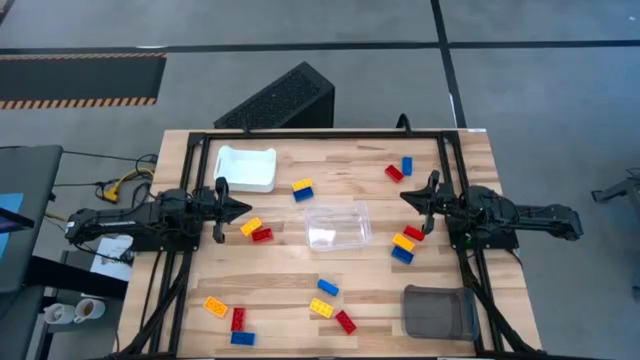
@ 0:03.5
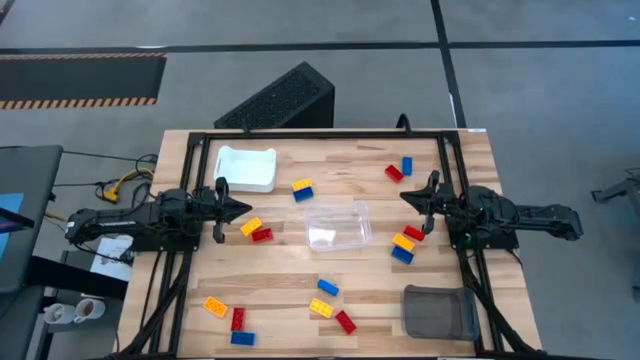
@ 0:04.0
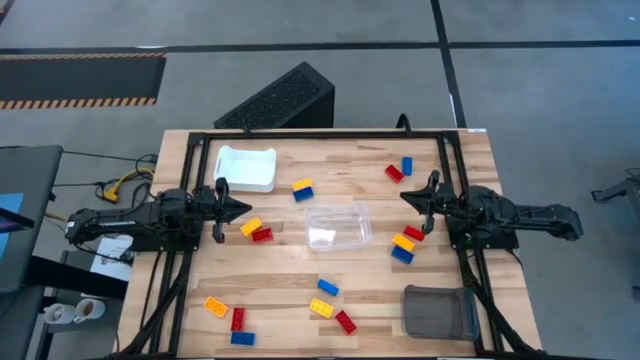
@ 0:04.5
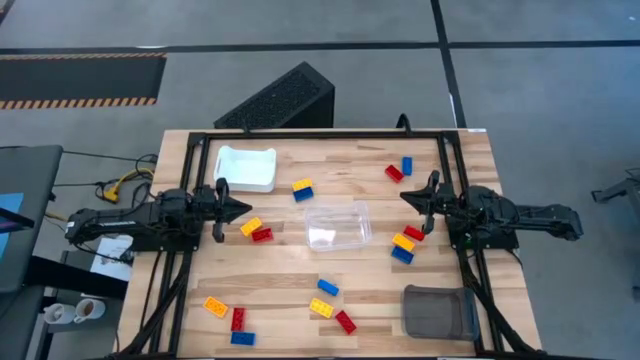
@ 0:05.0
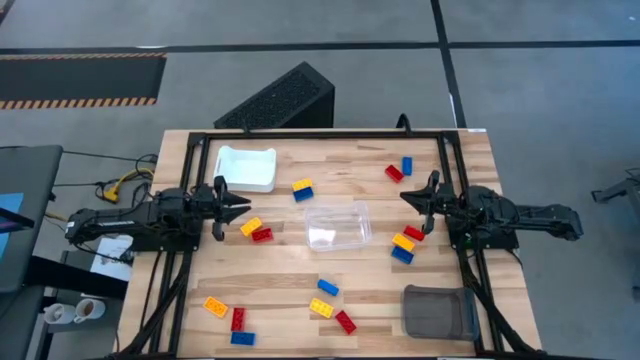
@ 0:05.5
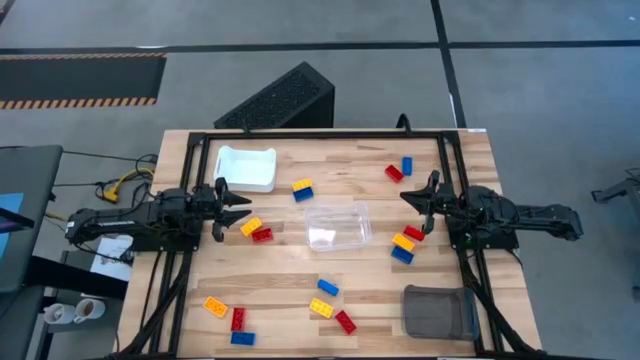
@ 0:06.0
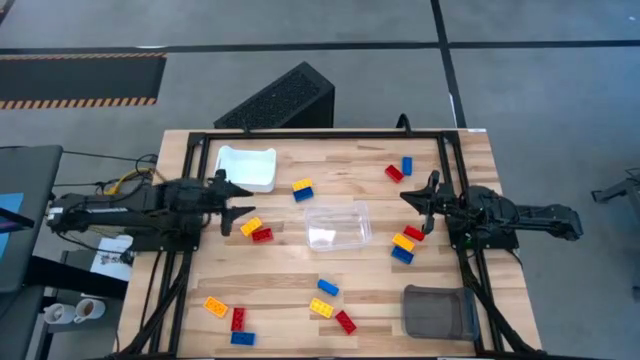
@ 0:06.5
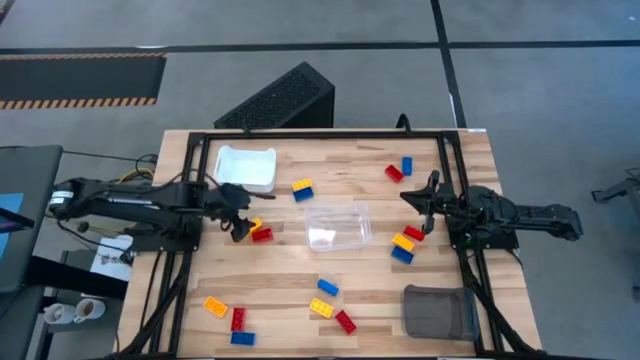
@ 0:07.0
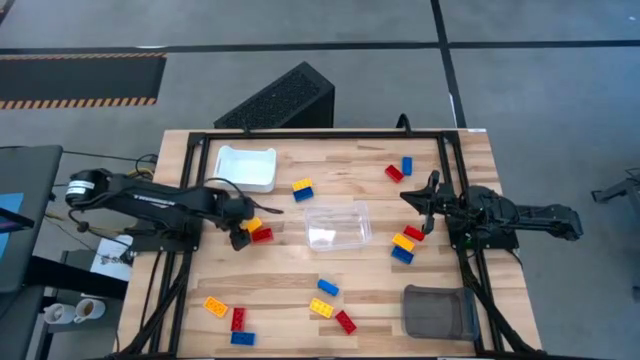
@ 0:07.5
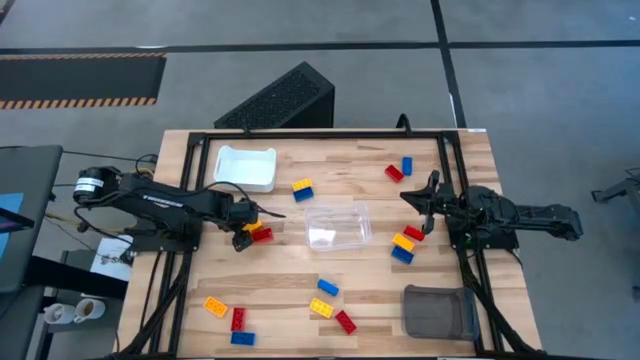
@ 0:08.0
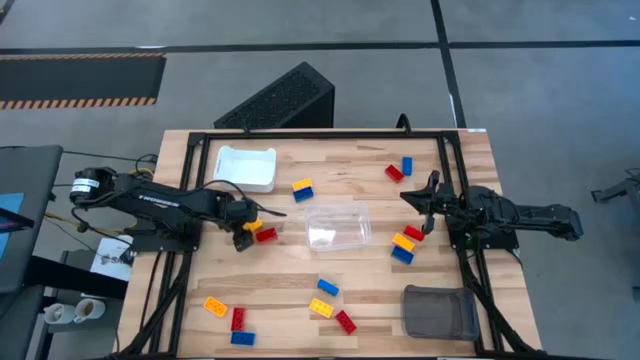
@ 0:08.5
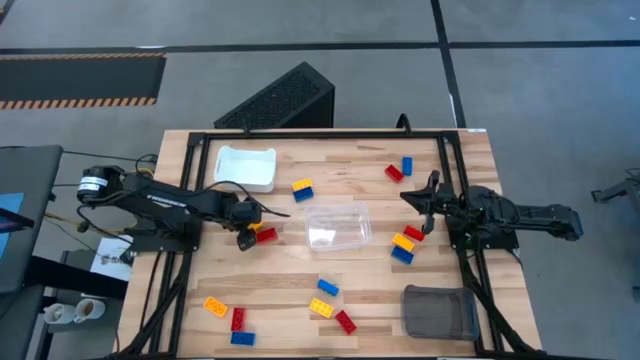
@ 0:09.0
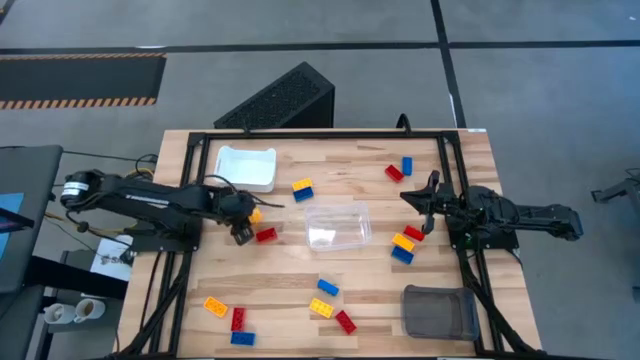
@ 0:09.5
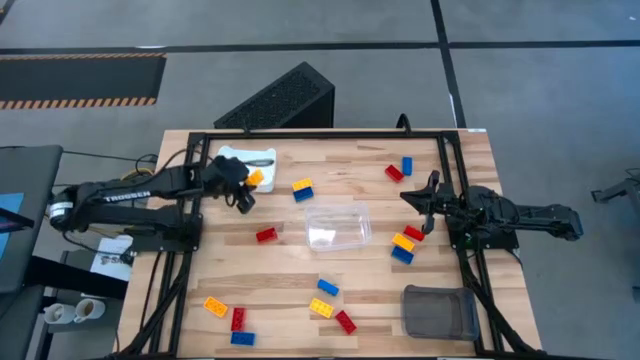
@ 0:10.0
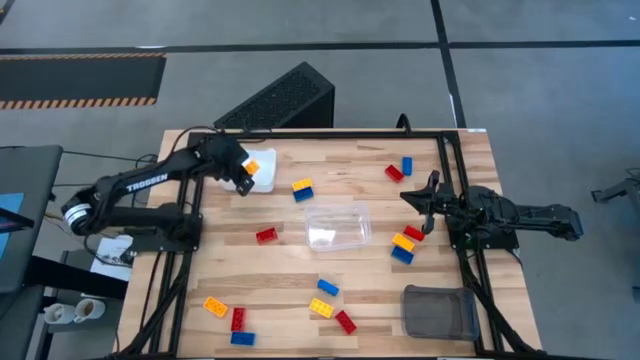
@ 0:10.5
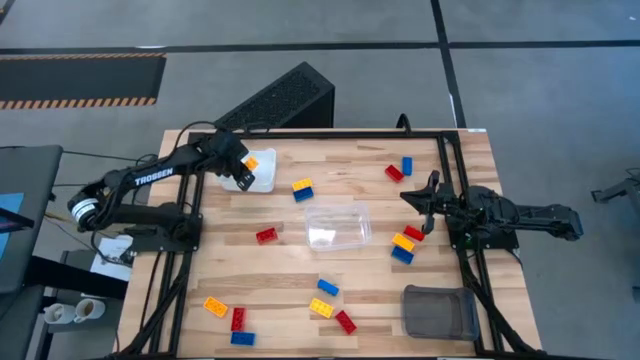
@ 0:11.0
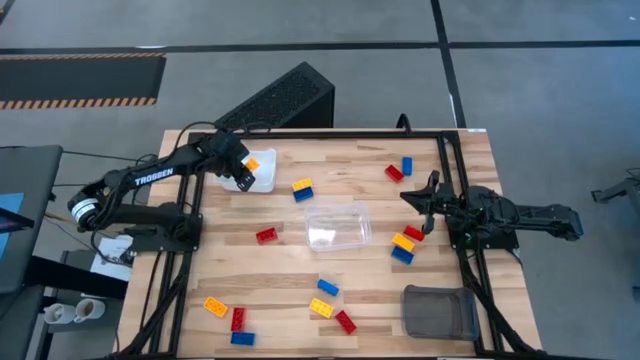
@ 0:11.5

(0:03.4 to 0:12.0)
Task: Sort & place blocks by color
Put the yellow game piece into the white bin

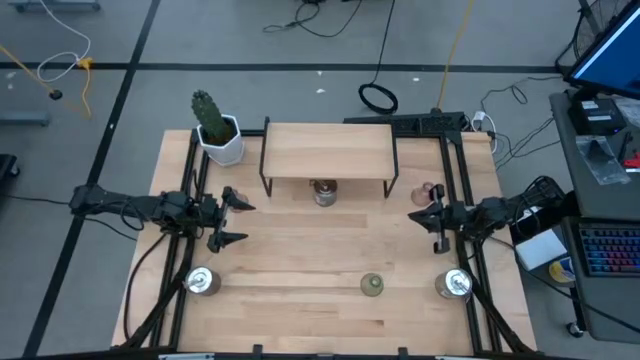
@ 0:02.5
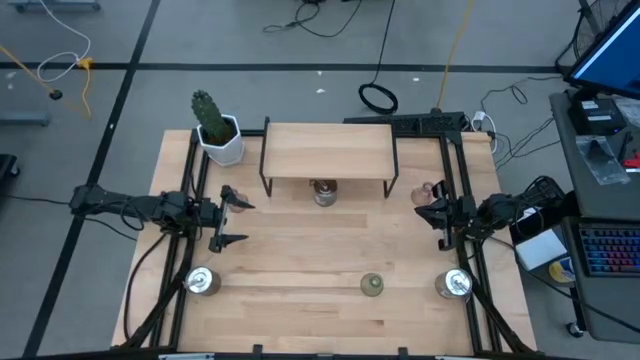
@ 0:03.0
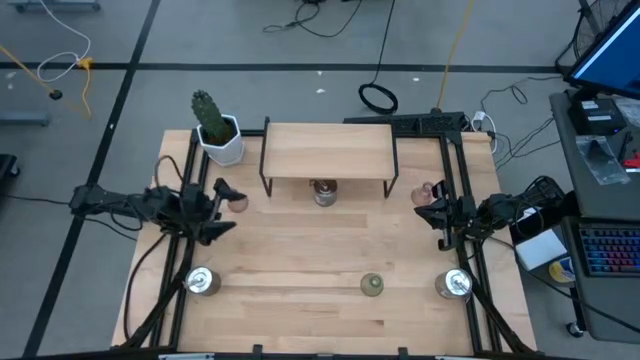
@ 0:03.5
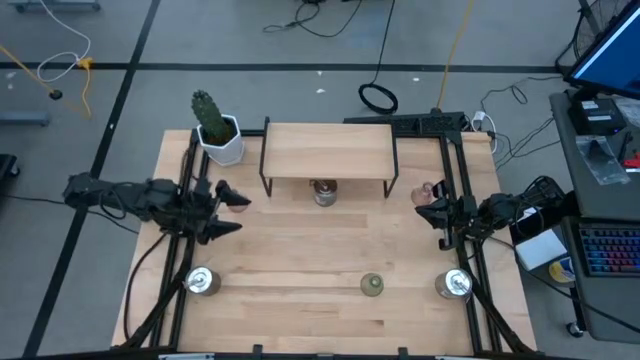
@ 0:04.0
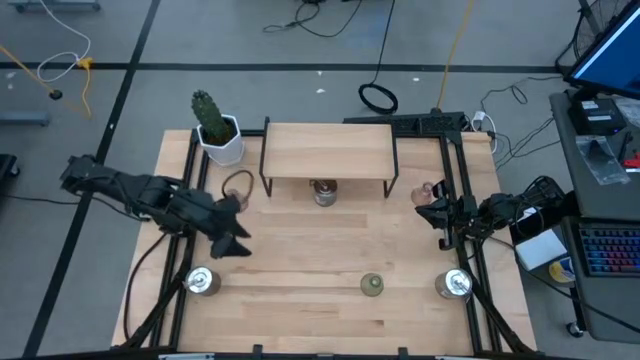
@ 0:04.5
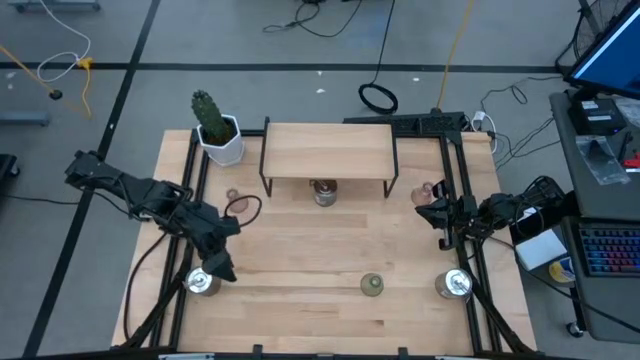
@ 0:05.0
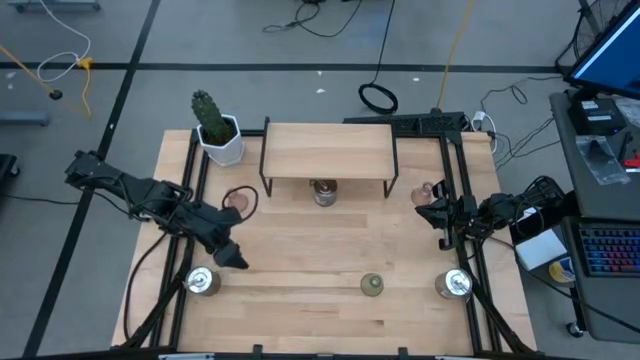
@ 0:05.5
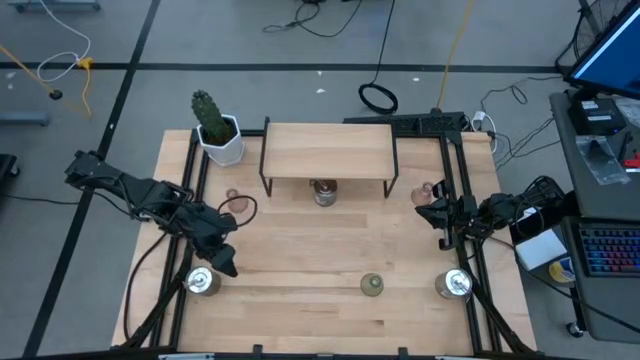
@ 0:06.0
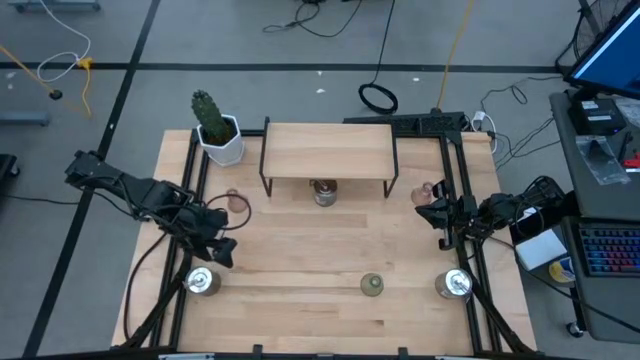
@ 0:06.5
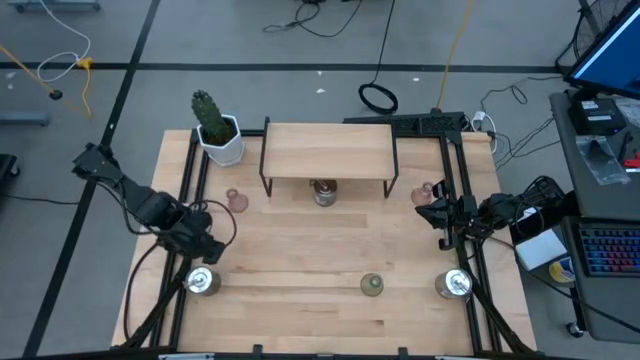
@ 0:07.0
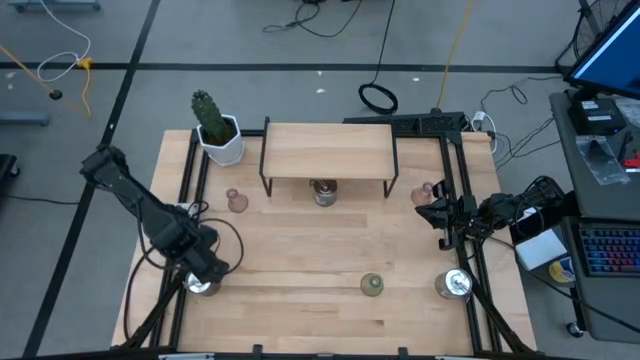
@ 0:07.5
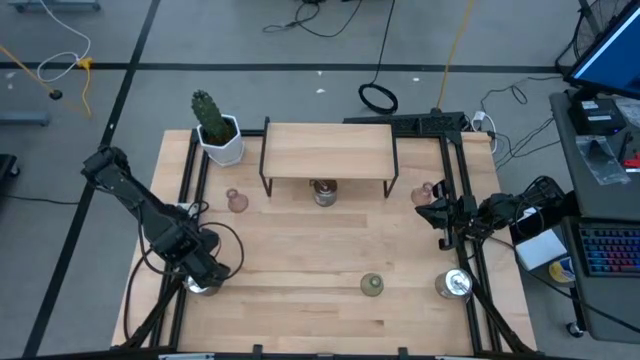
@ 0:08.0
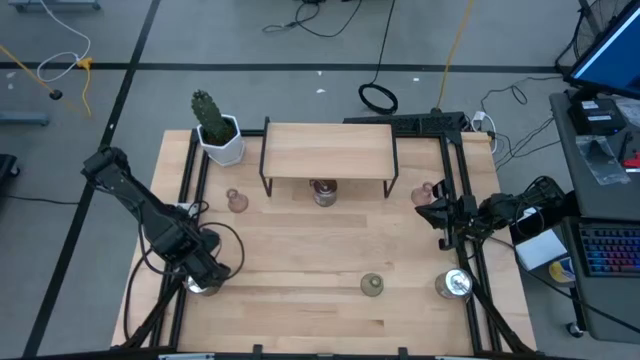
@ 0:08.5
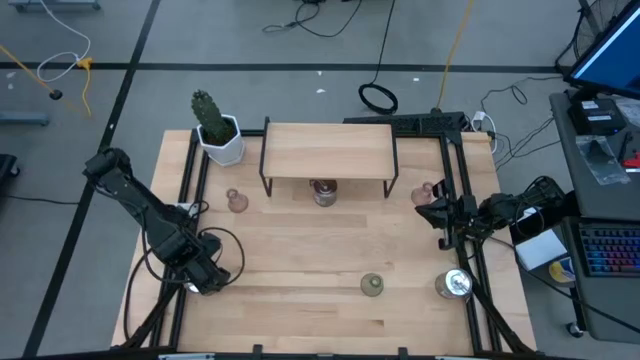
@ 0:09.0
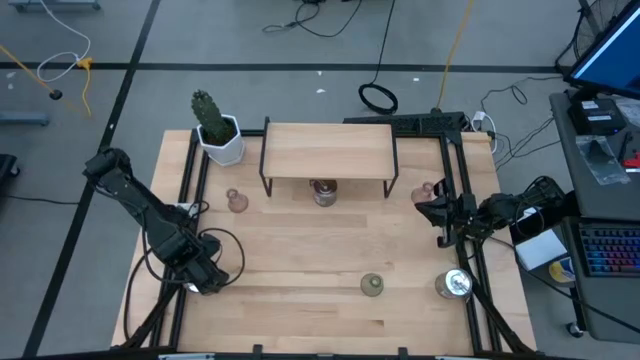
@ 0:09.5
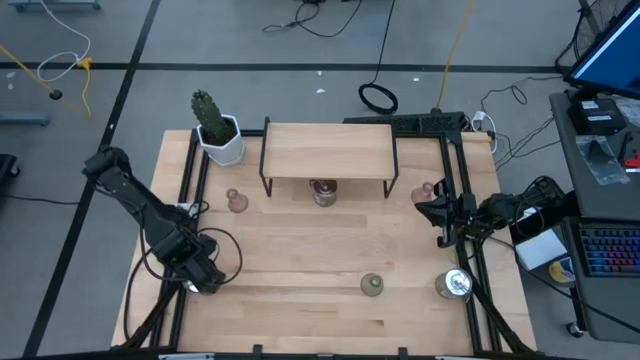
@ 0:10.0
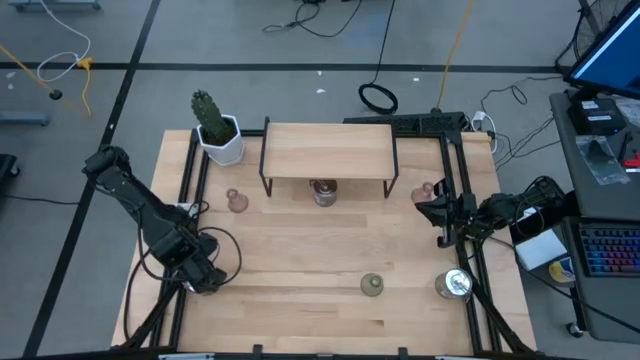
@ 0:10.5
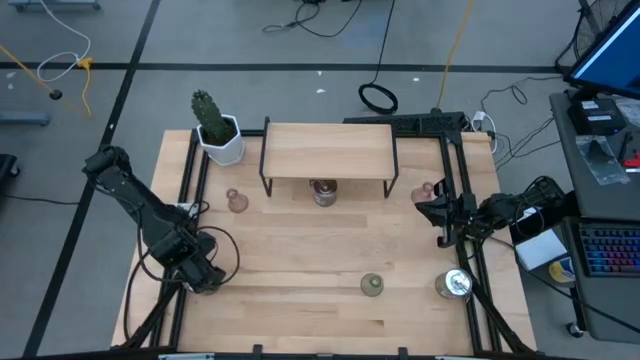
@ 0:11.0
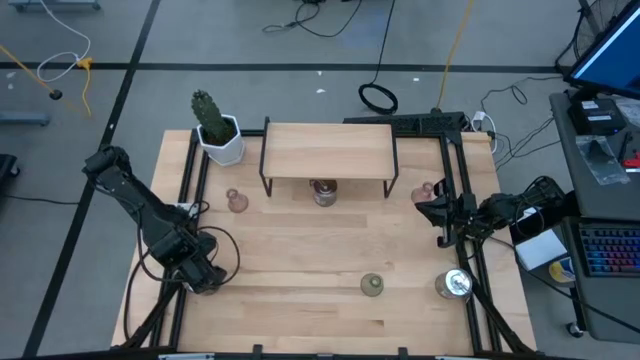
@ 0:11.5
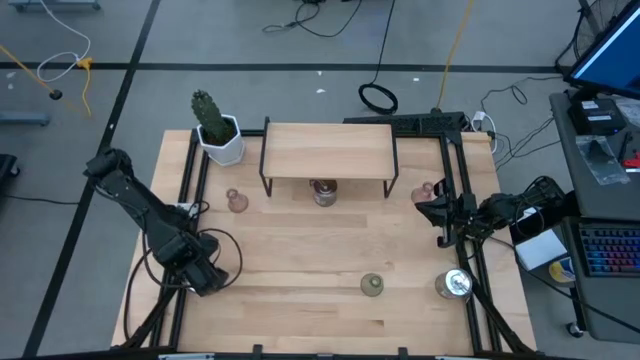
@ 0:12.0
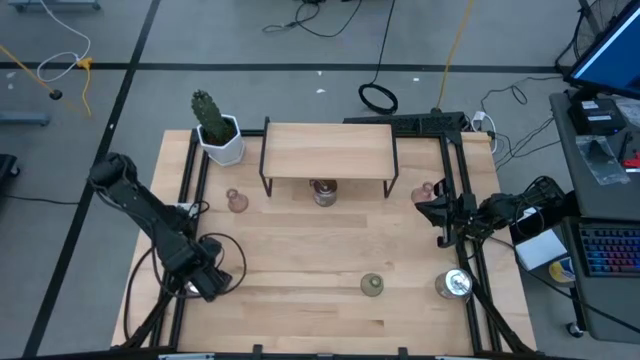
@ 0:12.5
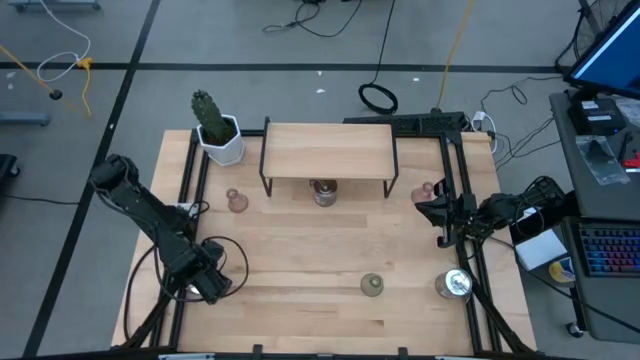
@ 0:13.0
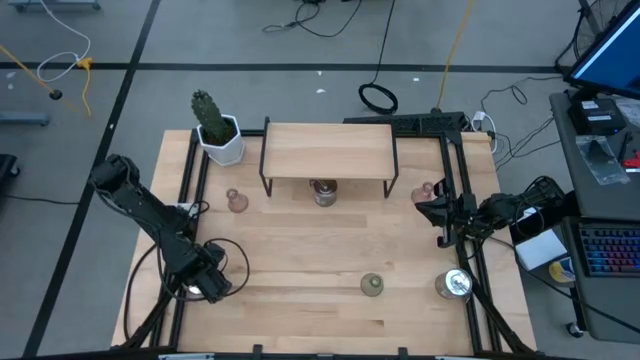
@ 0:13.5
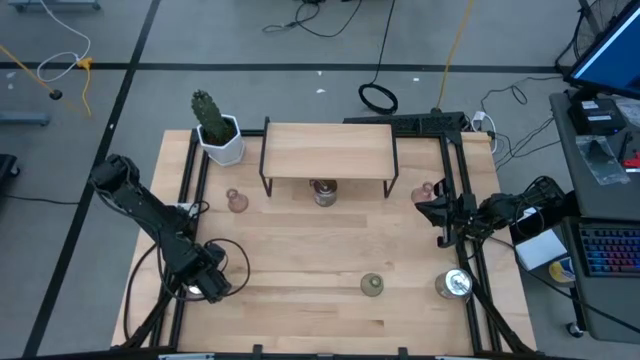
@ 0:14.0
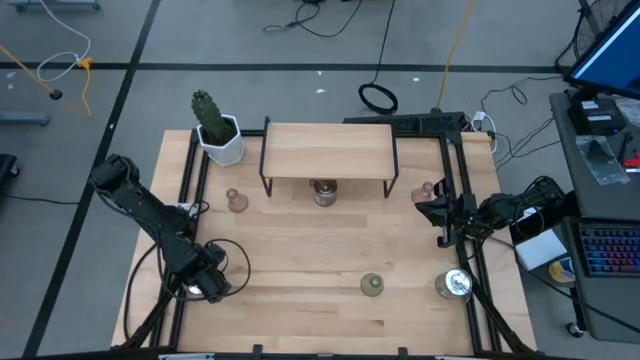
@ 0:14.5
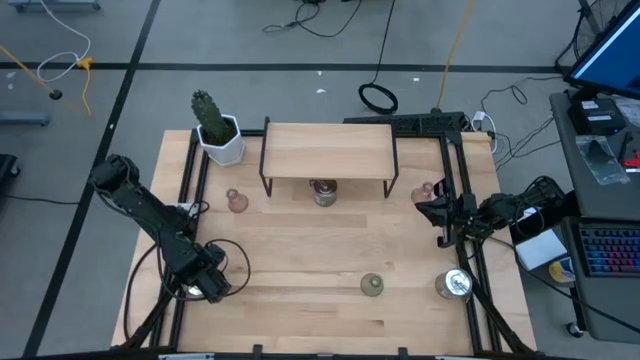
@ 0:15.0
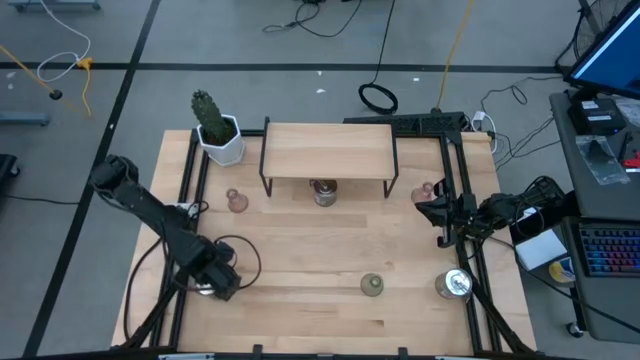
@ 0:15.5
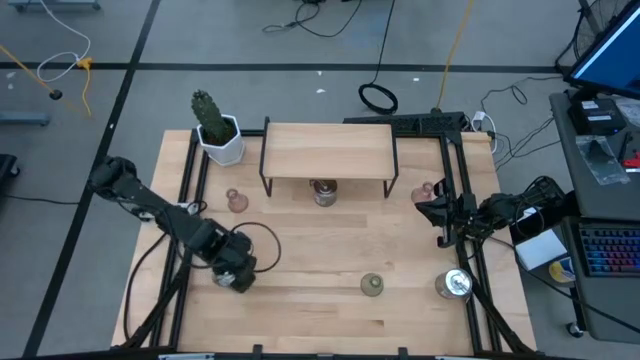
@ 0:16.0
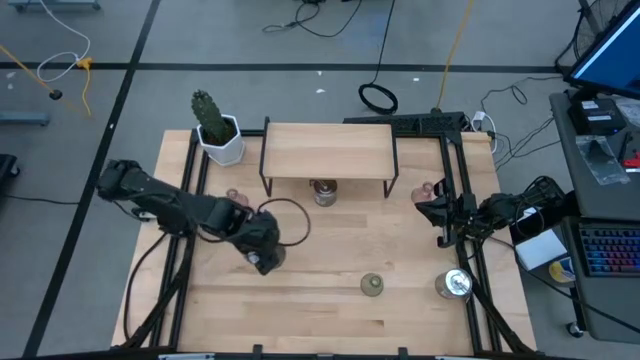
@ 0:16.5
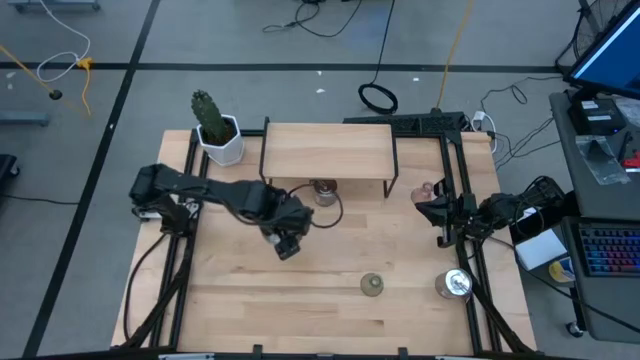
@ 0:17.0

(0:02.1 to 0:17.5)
Task: Pick & Place candle stick holders
Put the orange scented candle on the shelf
